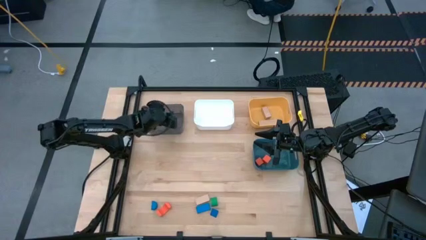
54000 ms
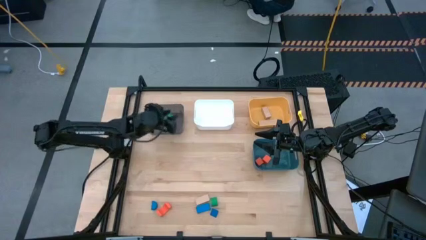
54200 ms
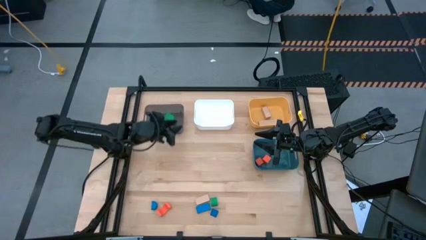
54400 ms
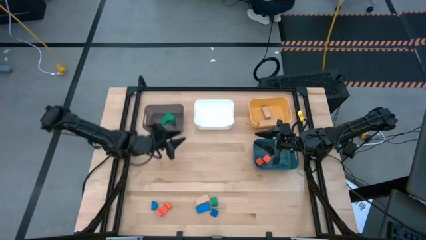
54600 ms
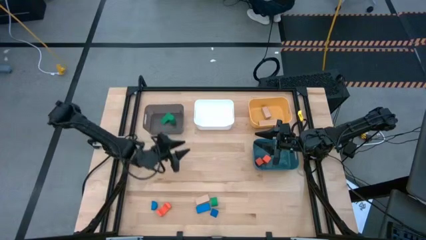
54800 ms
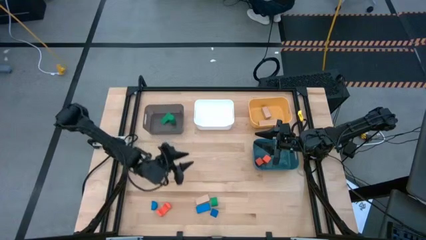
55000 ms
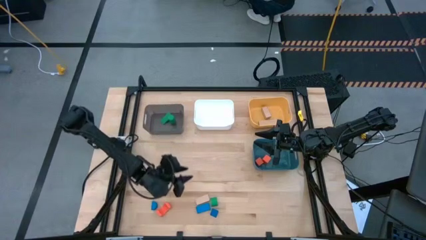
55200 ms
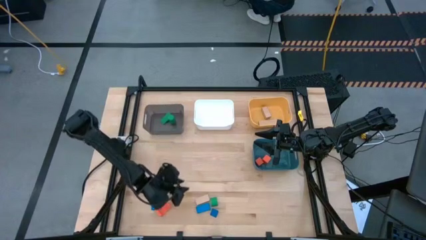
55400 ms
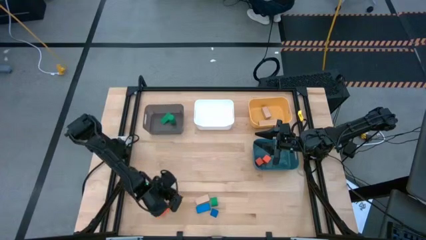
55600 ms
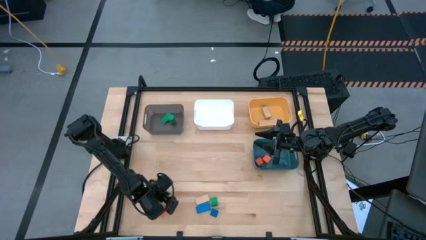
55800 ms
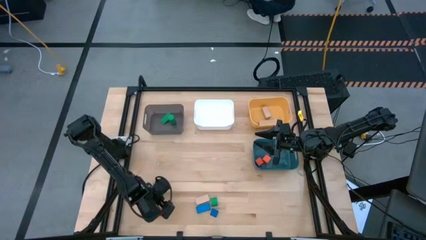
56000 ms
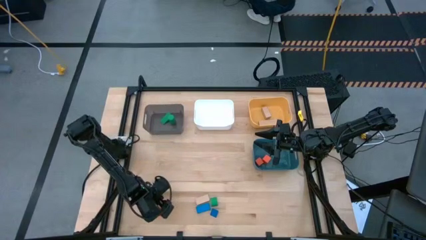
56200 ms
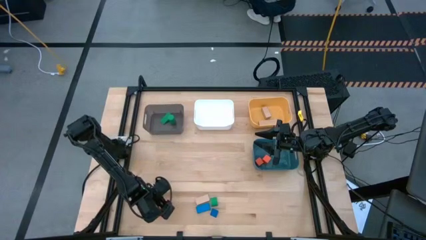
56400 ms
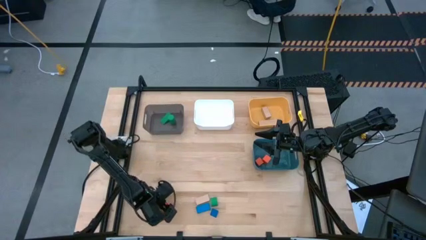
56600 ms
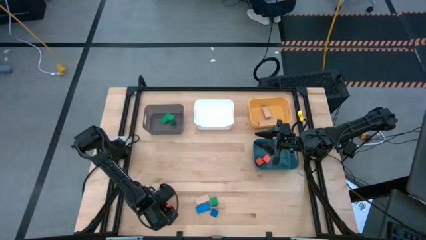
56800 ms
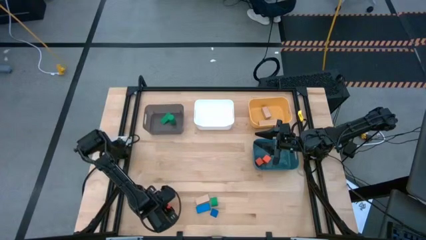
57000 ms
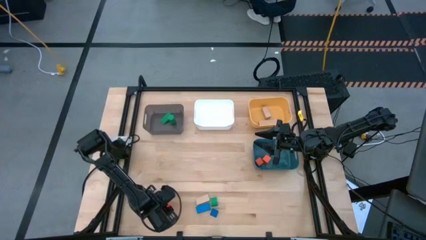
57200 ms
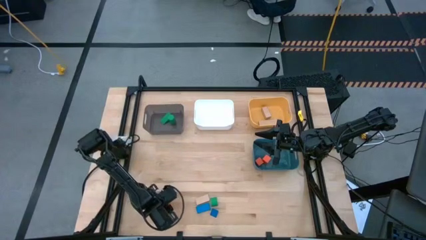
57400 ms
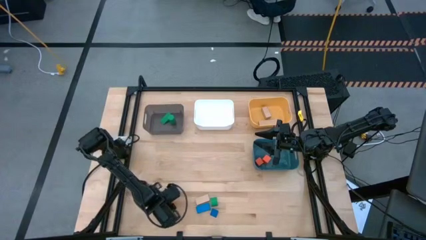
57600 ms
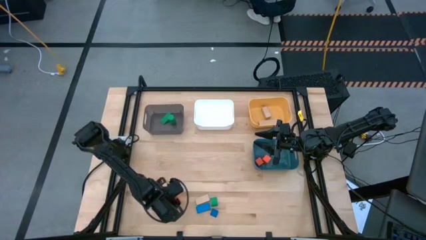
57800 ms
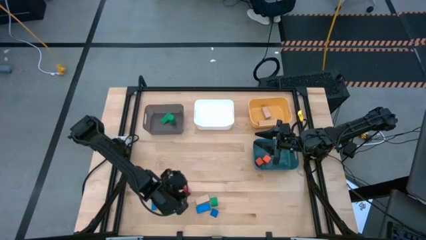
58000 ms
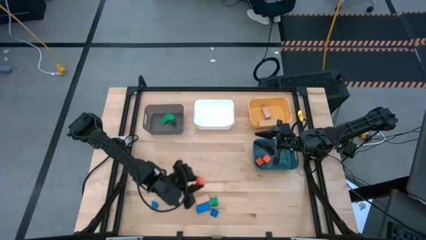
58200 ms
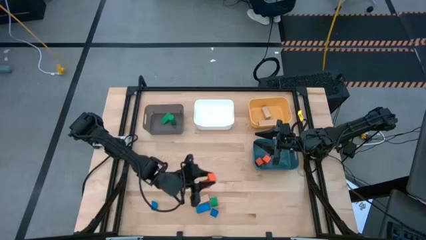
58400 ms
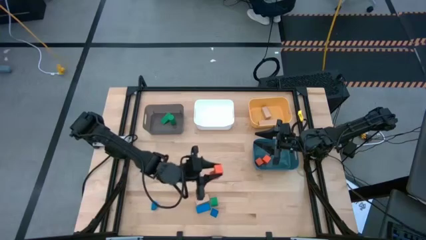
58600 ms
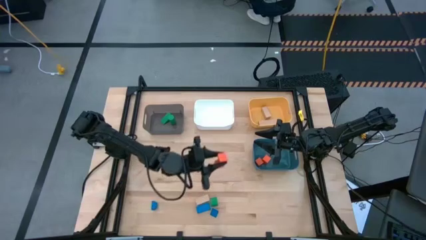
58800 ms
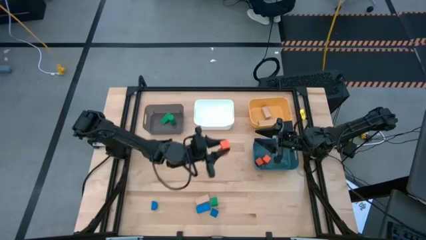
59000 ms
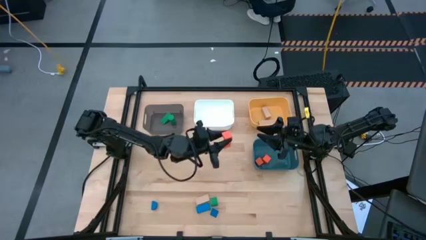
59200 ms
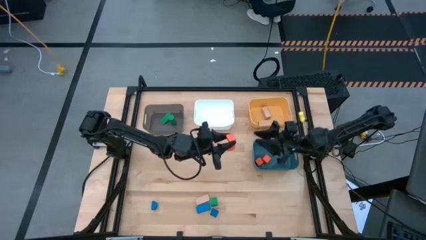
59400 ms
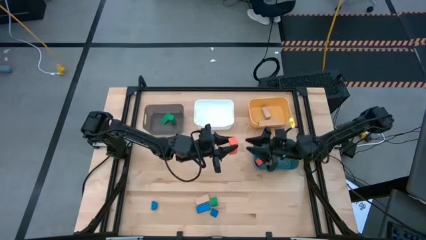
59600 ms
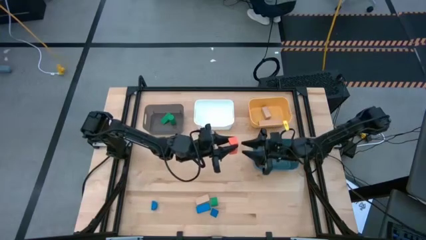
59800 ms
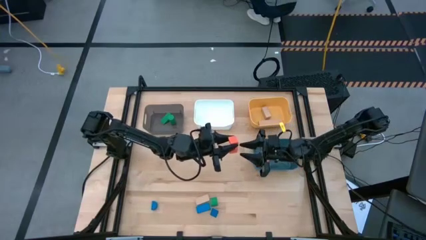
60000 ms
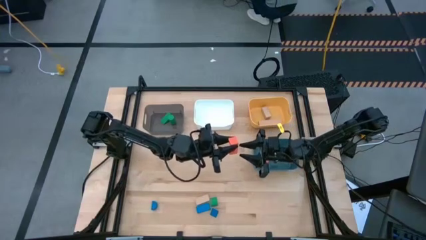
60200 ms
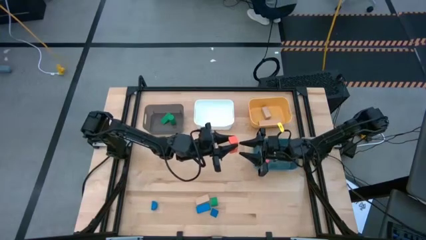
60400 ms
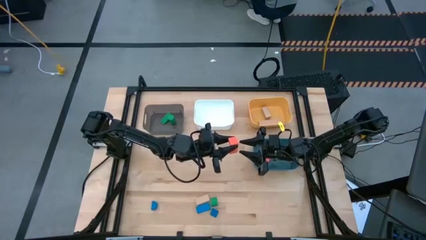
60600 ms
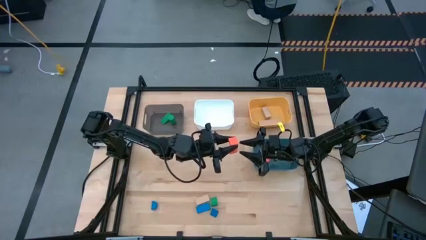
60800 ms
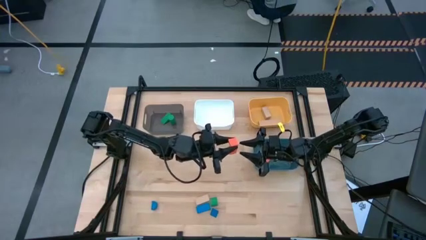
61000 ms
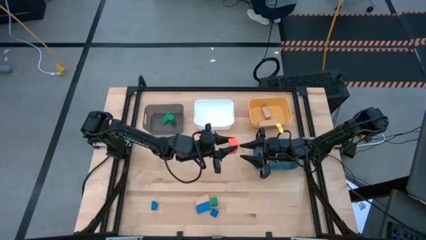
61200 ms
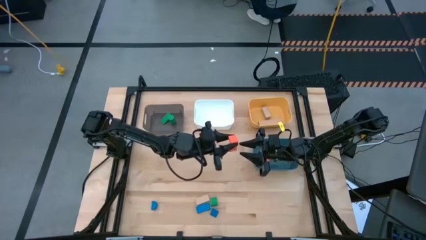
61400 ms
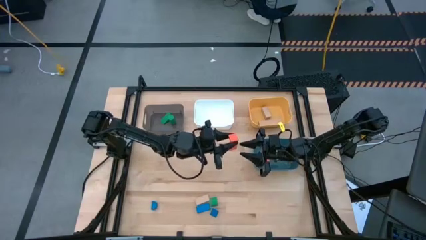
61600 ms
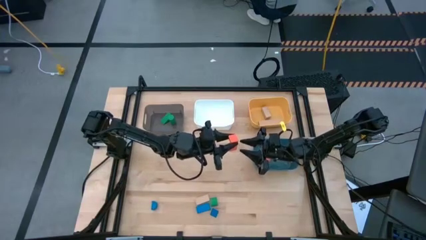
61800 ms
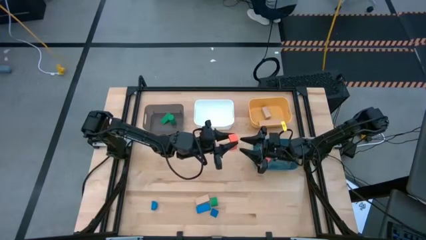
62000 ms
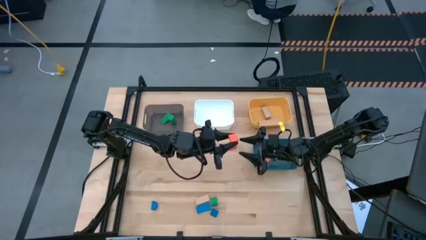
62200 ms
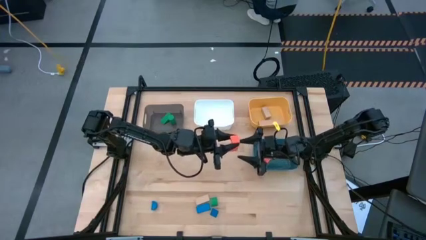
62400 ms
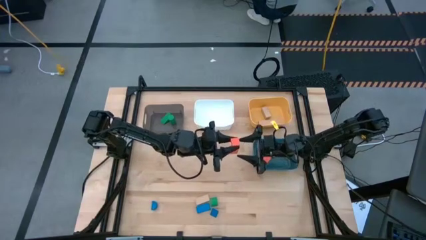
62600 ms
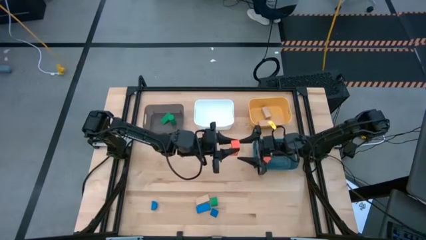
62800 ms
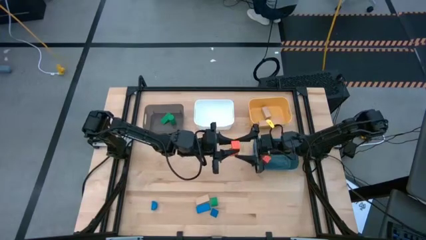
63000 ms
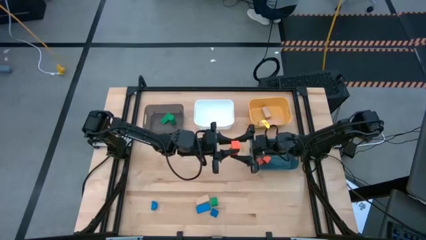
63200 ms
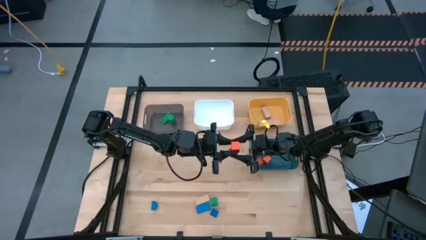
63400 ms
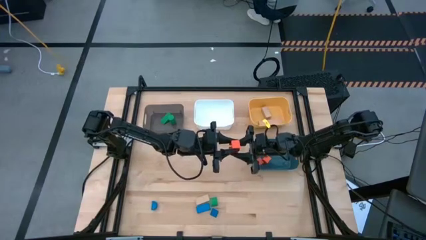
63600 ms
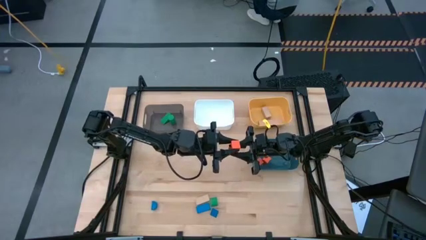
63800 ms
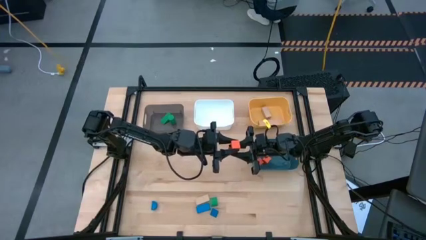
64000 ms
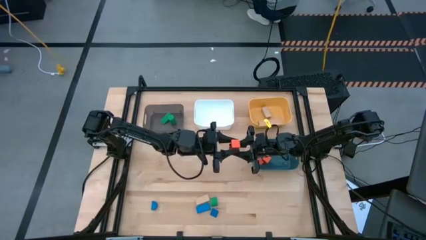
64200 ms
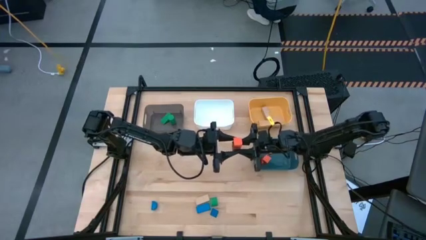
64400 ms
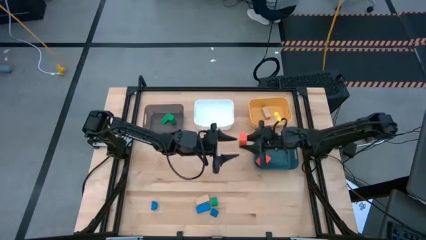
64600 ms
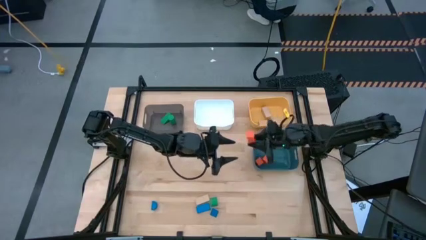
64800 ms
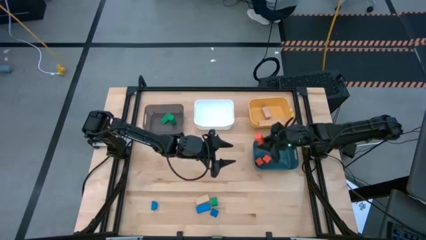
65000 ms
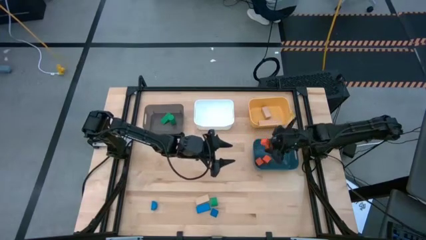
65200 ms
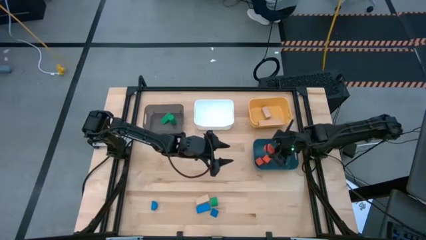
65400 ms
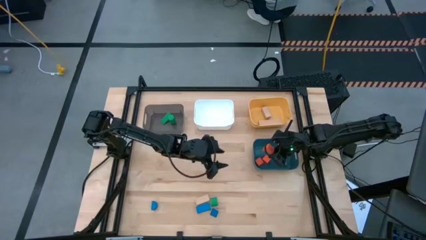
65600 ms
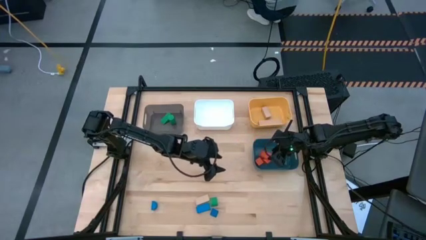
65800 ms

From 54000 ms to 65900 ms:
Task: Sort & place blocks by color
Put the orange block into the blue bin

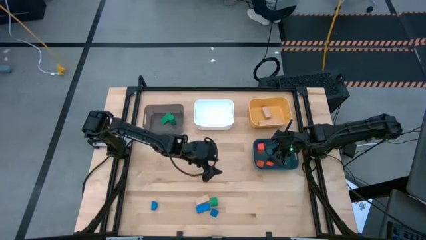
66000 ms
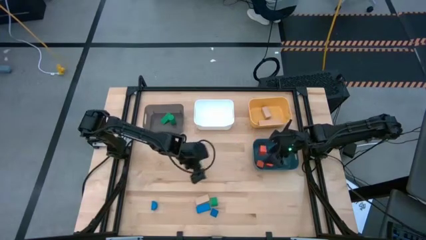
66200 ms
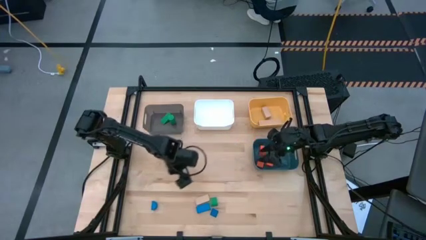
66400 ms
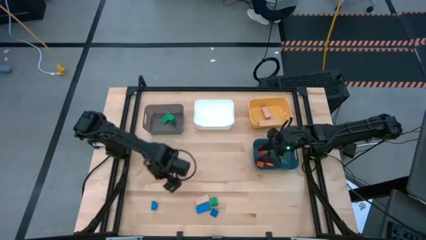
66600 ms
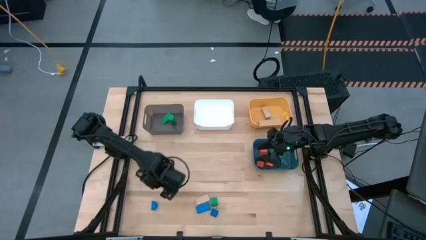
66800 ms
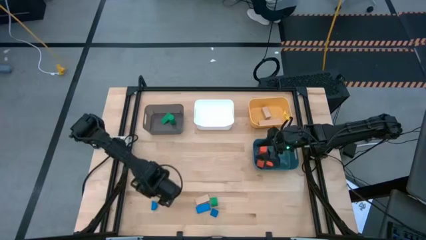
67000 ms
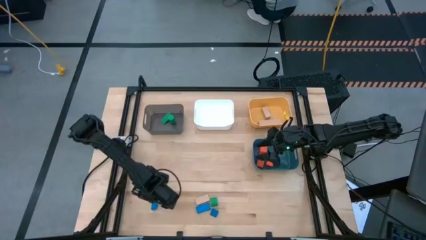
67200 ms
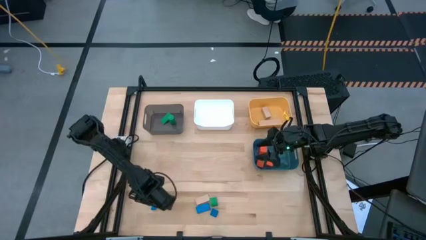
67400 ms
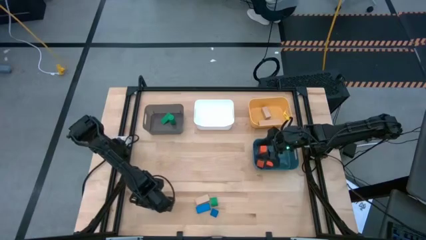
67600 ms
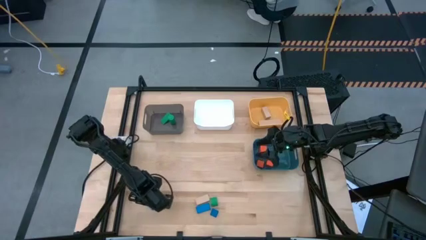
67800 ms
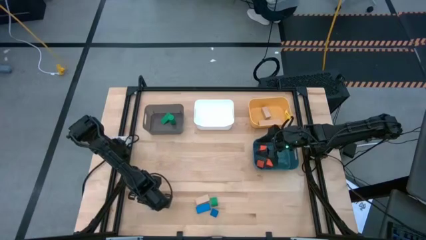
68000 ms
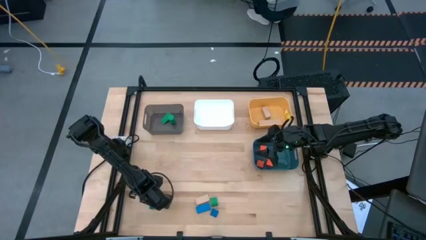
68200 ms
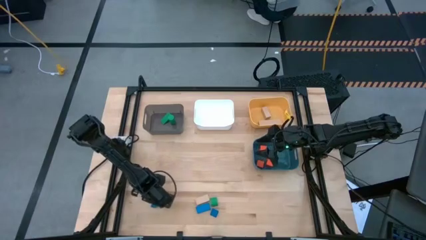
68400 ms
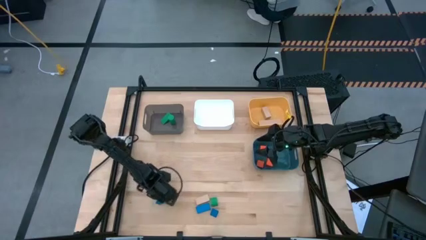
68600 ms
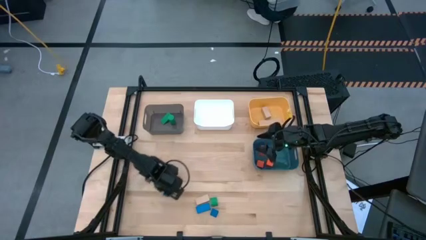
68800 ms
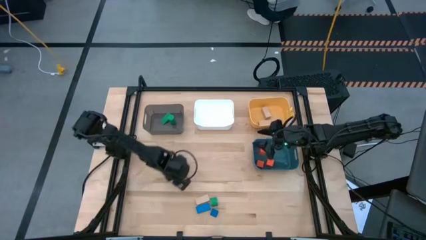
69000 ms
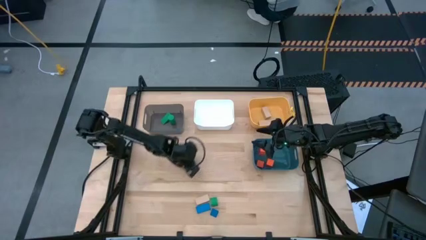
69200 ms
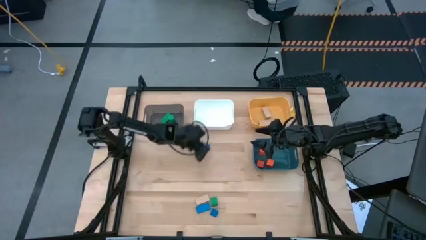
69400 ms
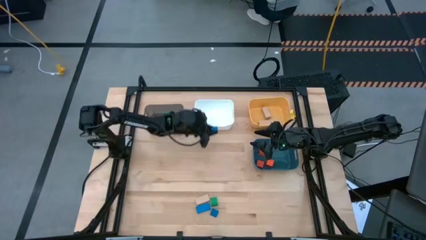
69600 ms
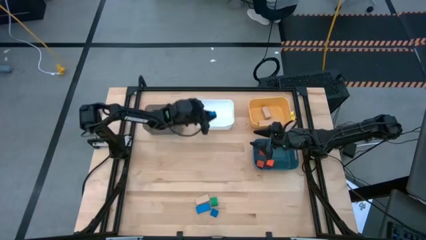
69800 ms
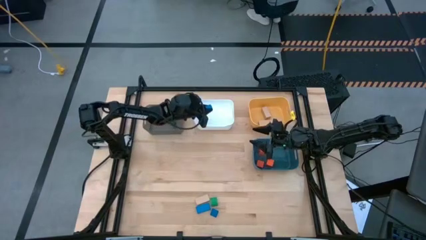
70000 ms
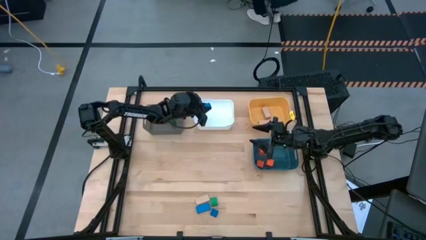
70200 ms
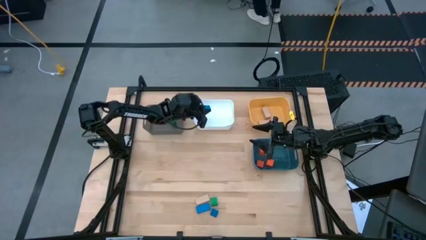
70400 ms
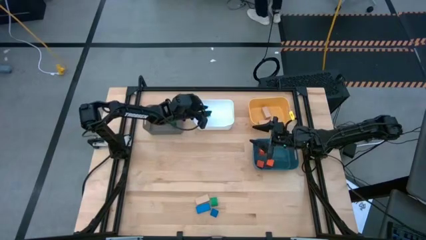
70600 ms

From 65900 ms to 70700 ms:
Put the left blue block into the white bin
